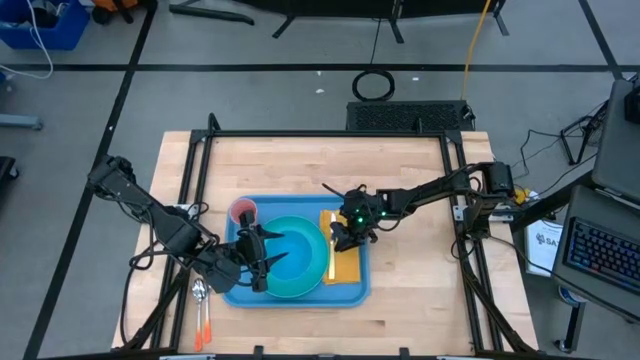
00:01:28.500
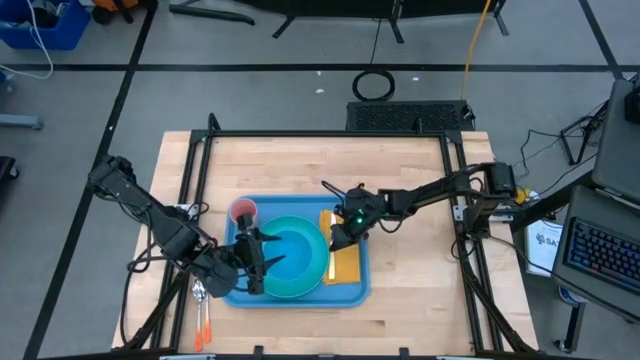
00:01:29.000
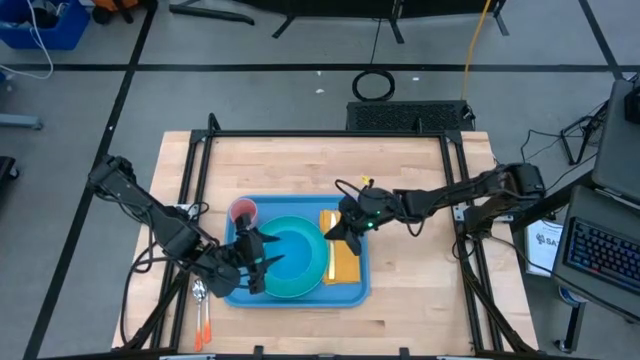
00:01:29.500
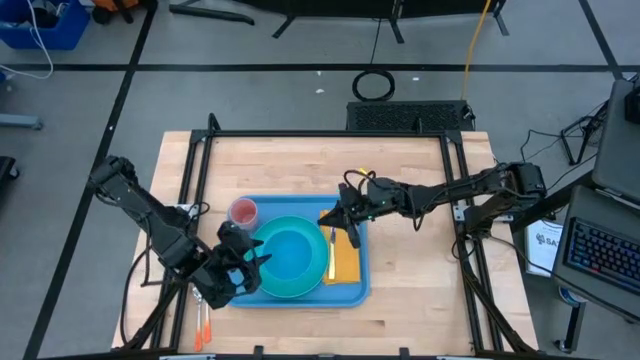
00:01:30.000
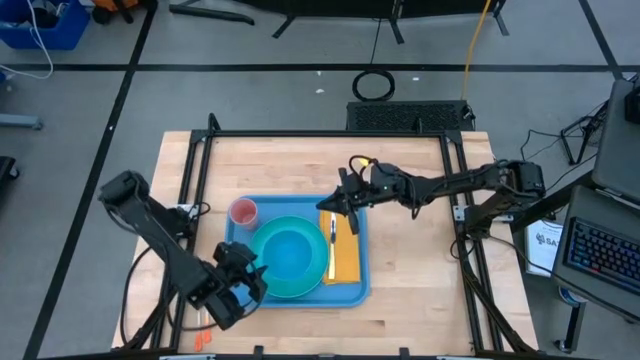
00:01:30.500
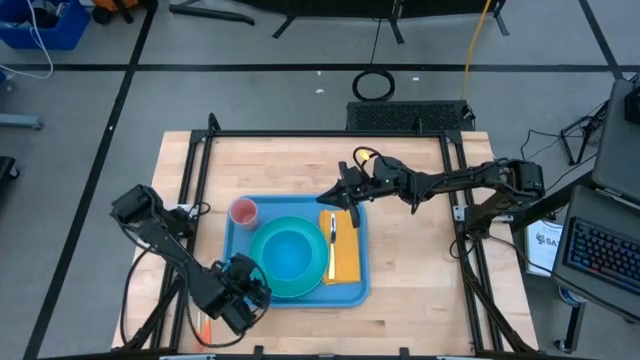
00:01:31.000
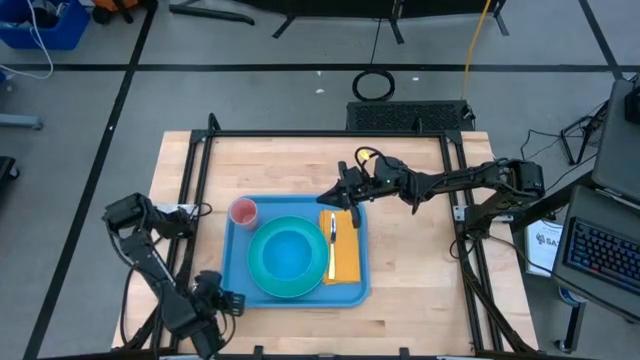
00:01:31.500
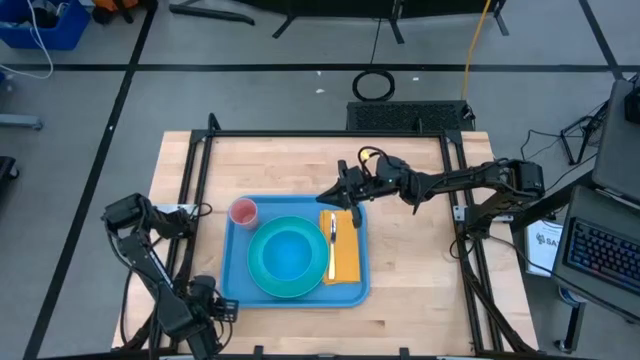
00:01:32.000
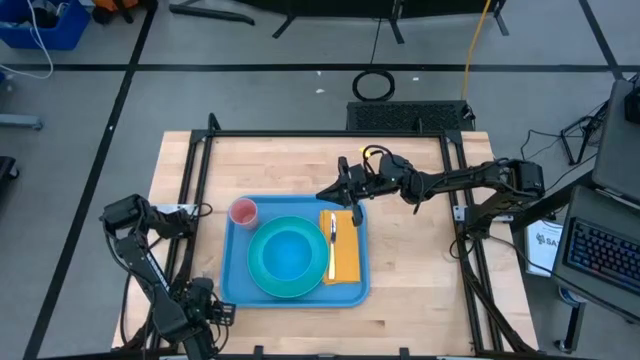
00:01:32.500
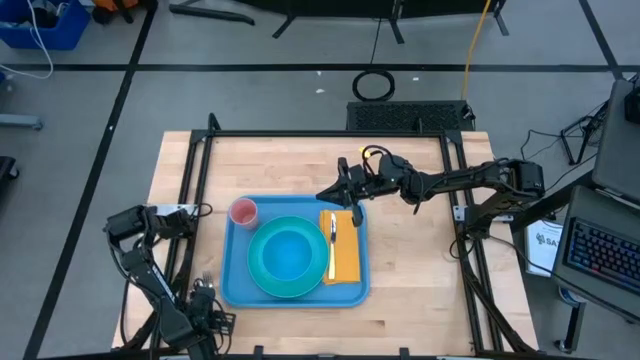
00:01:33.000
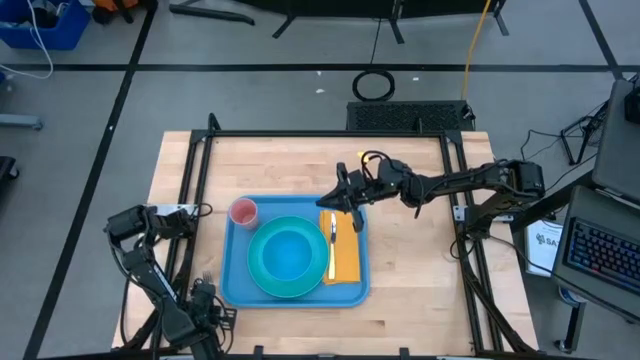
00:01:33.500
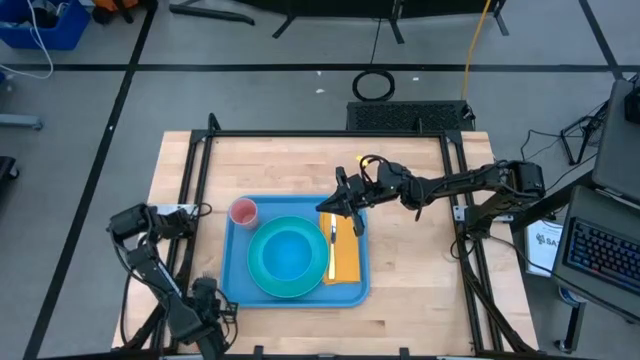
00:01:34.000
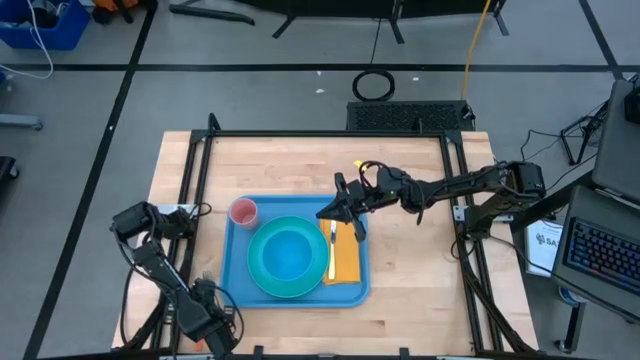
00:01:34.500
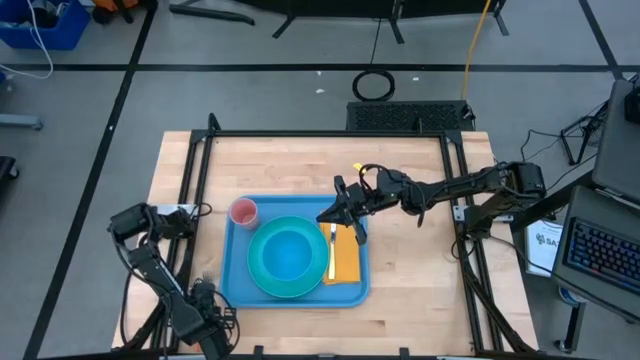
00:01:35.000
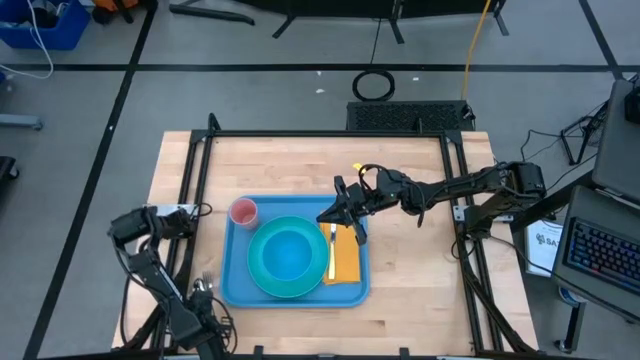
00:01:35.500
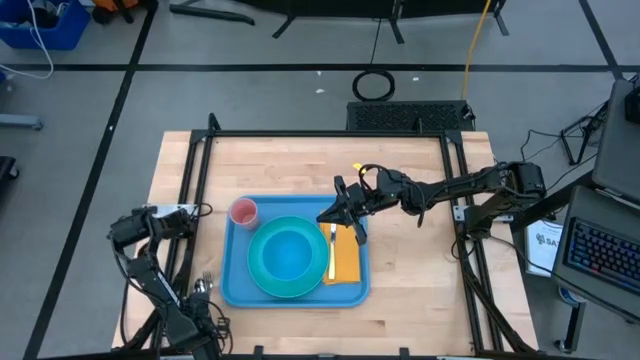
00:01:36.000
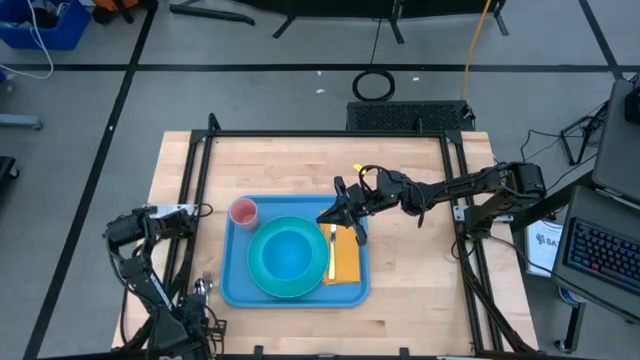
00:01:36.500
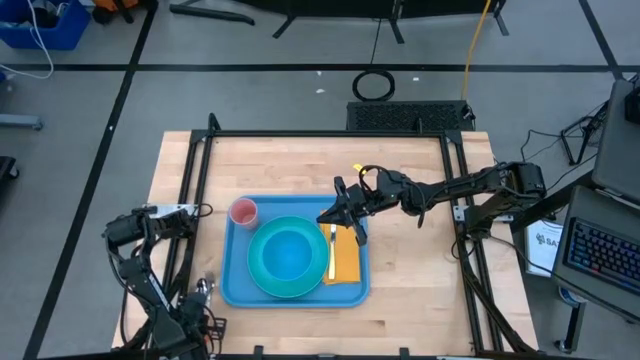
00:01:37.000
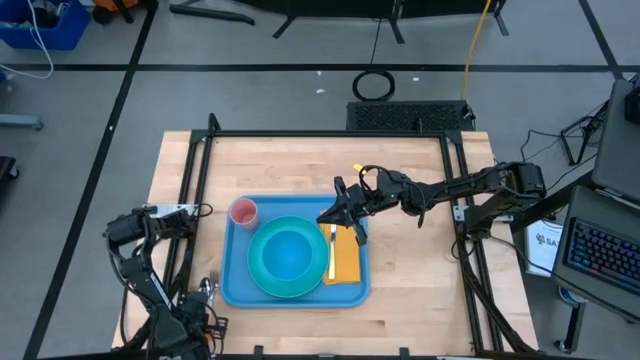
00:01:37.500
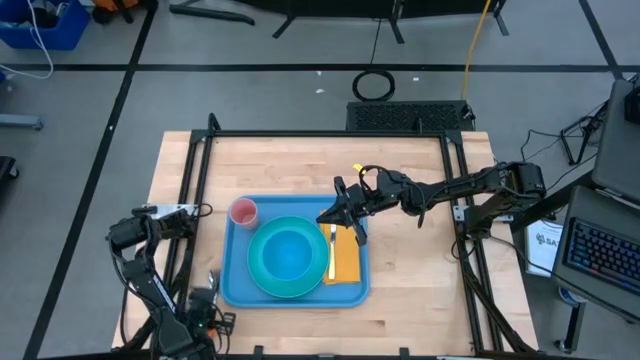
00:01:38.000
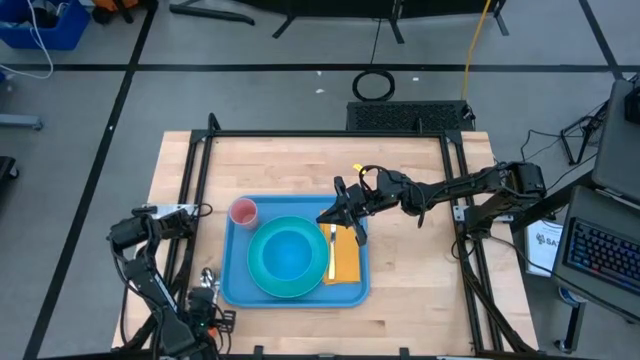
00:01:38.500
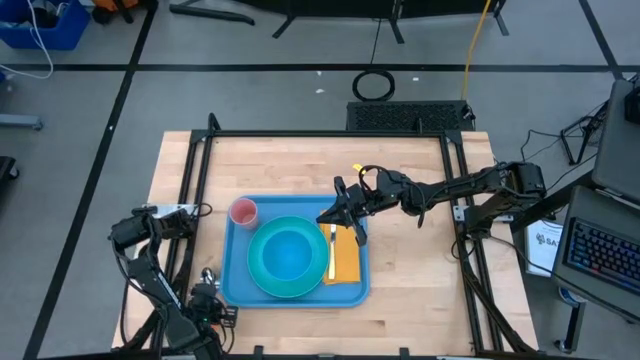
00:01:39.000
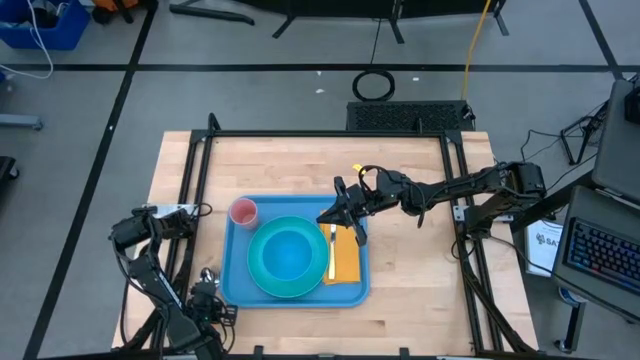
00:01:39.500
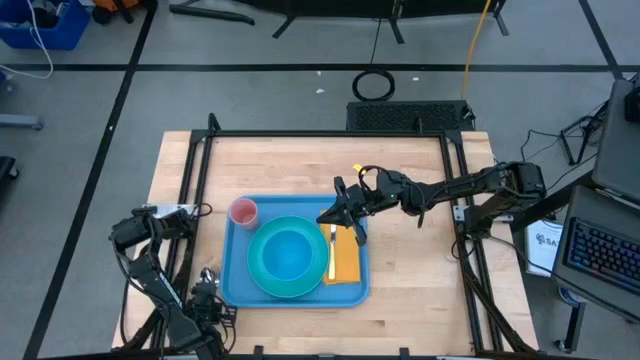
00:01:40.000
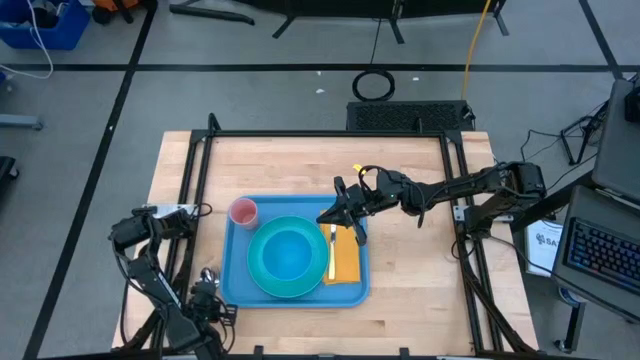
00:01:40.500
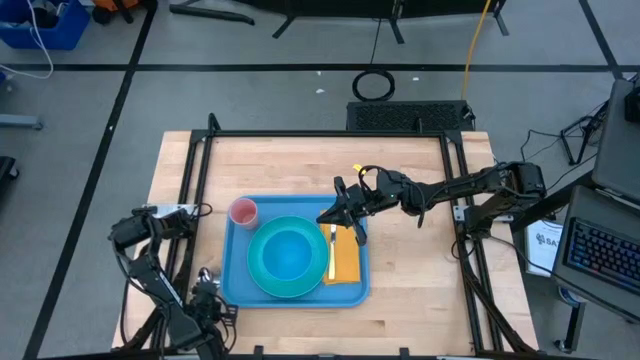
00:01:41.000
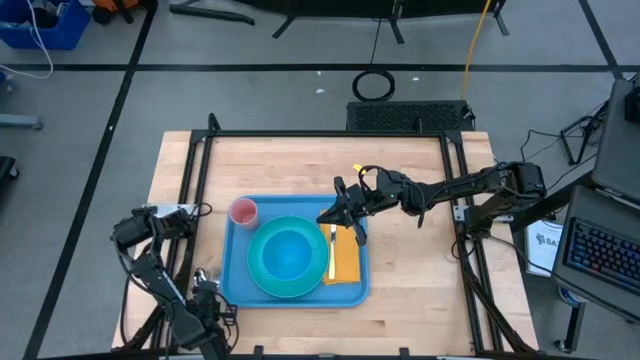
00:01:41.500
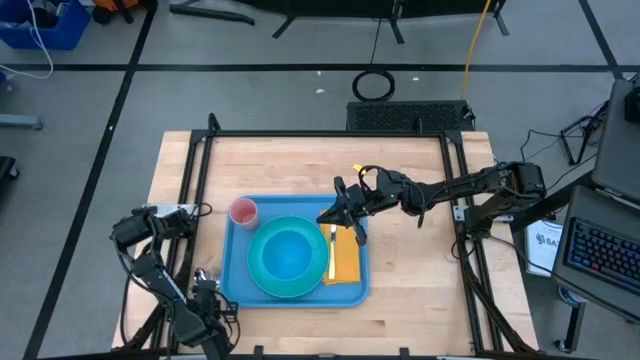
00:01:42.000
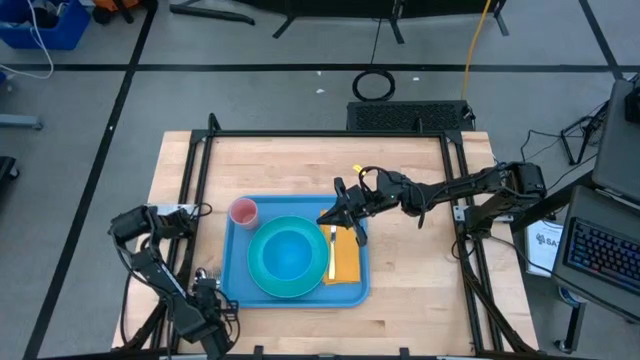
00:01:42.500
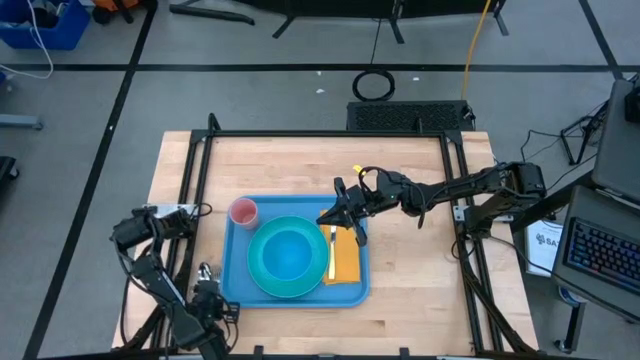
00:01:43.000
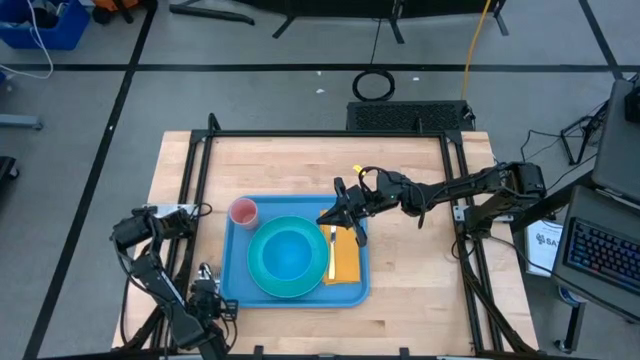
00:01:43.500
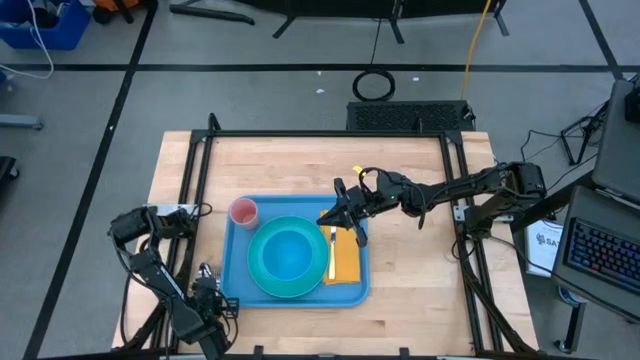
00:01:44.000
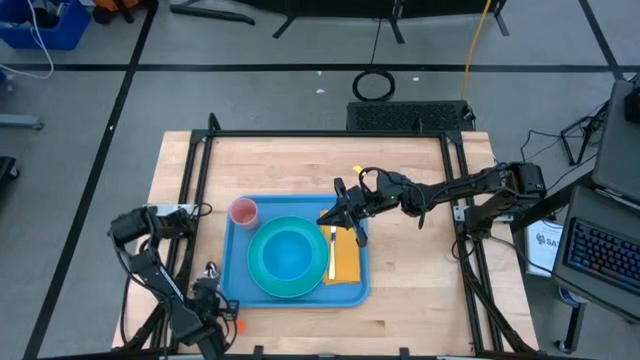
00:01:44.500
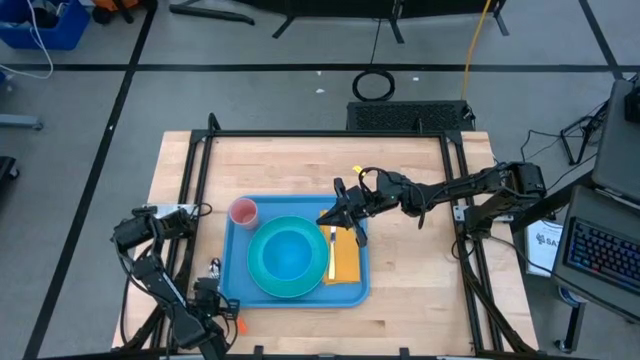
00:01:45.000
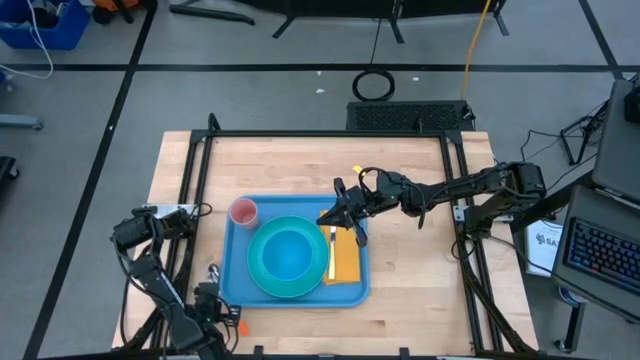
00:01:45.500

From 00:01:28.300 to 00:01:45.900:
Task: Set up tray
Put the orange spoon on the yellow napkin to the right of the yellow knife

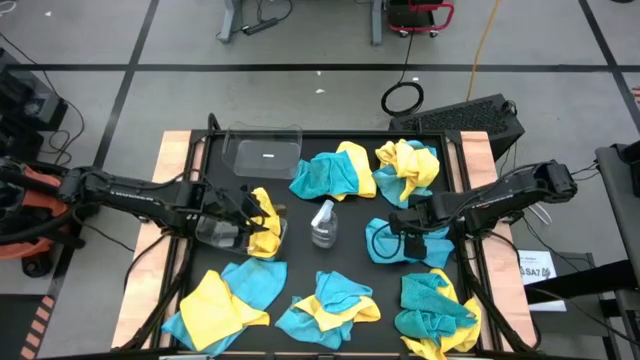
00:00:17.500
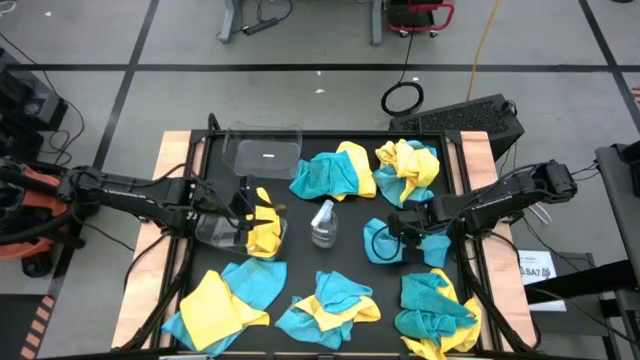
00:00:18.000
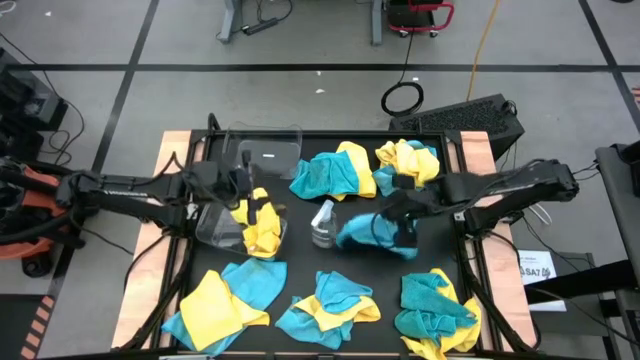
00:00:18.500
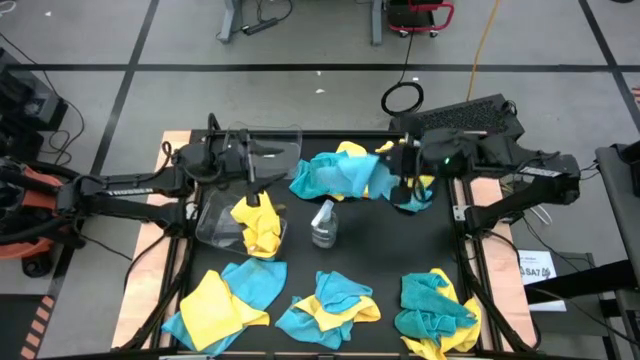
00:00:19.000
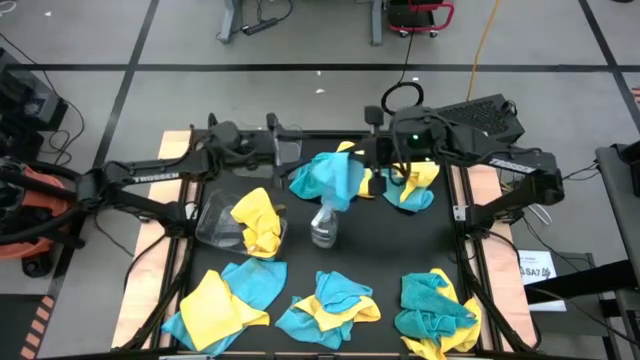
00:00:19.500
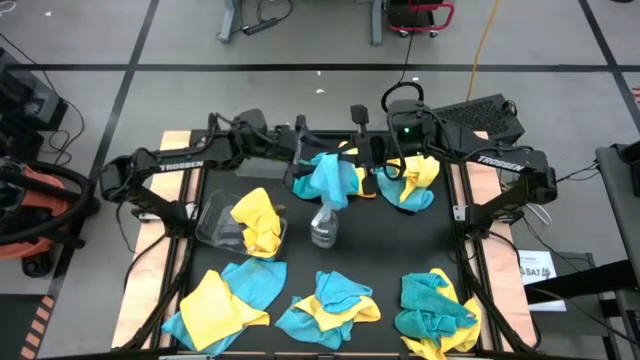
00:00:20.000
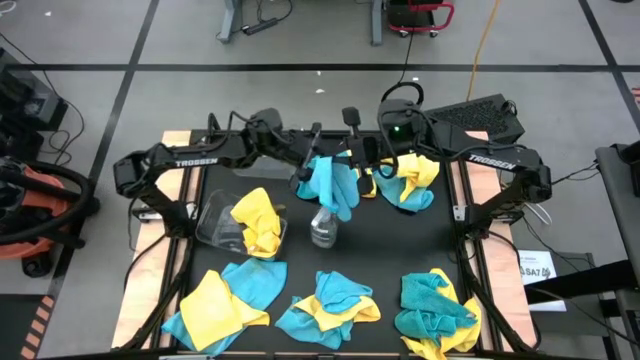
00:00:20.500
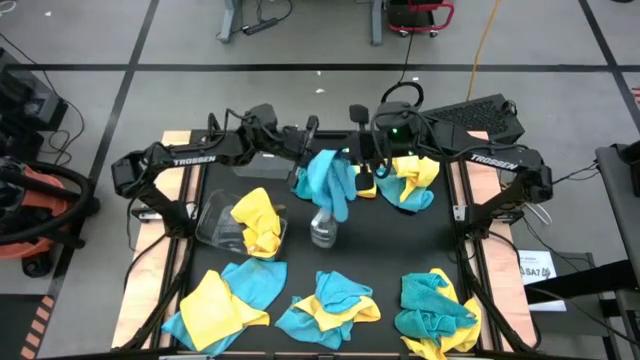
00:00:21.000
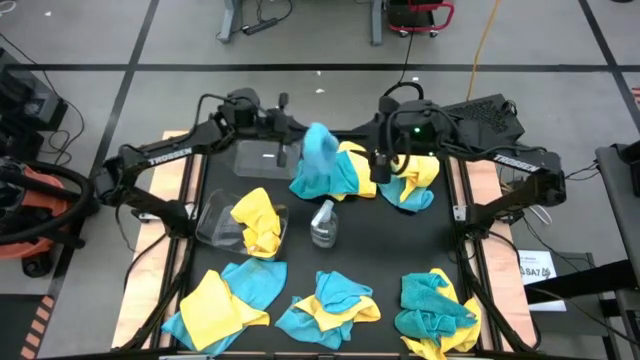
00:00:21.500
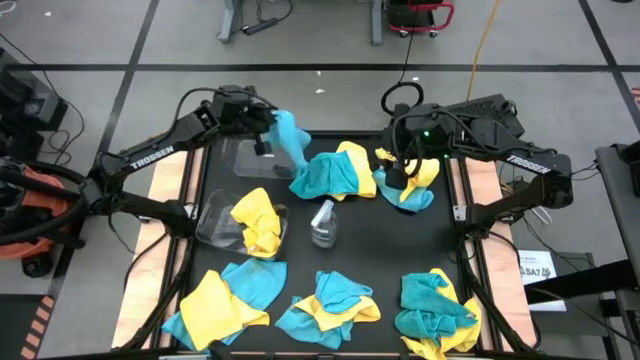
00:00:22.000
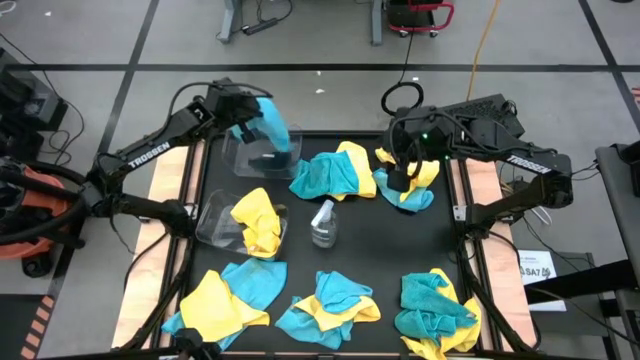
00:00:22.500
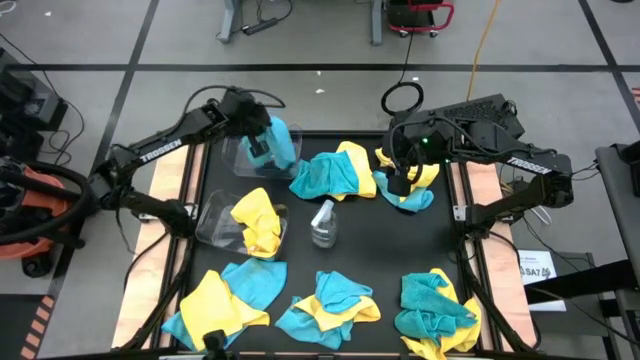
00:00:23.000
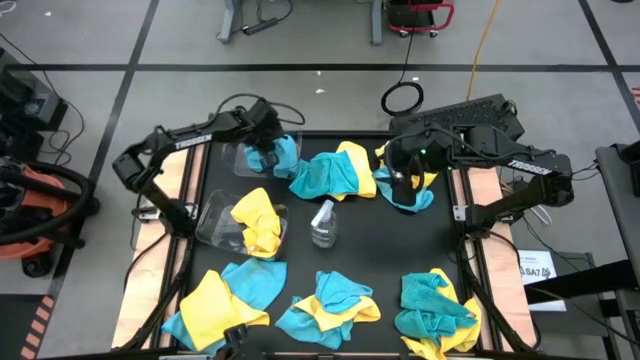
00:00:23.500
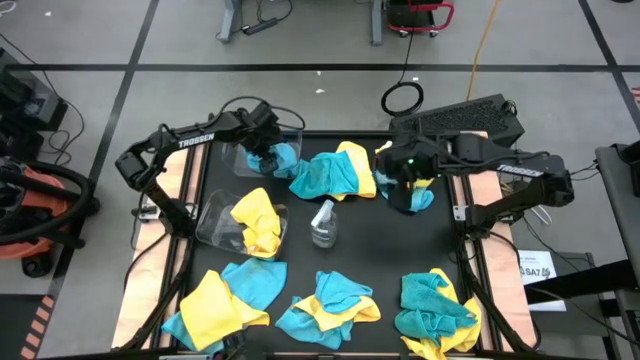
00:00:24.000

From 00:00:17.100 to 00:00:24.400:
Task: Sort microfiber towel by color & place in baskets
Put the blue microfiber cloth into the top transparent bin
